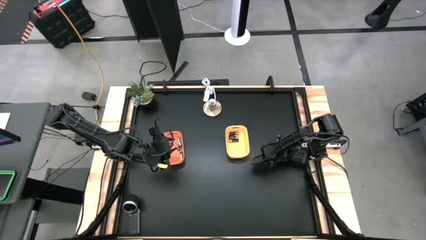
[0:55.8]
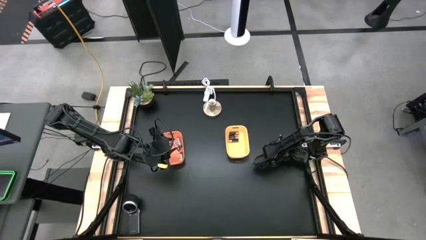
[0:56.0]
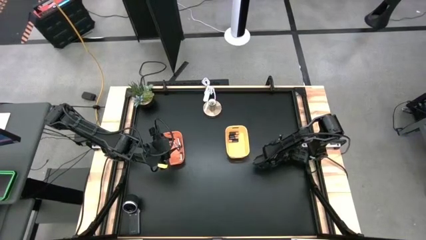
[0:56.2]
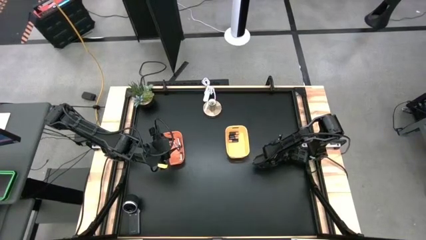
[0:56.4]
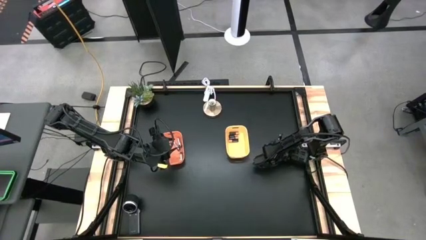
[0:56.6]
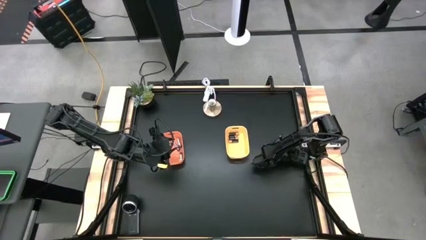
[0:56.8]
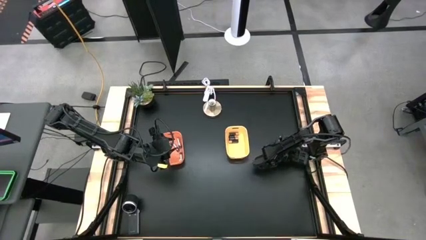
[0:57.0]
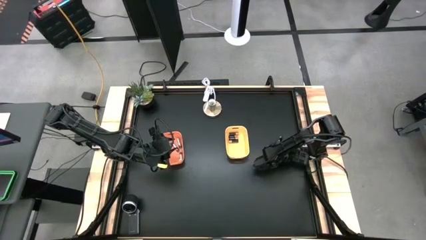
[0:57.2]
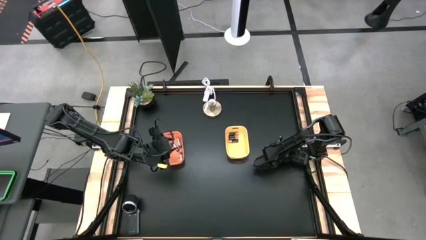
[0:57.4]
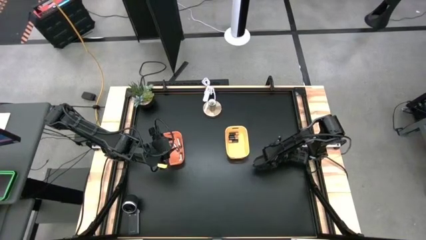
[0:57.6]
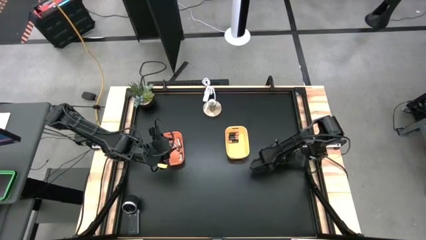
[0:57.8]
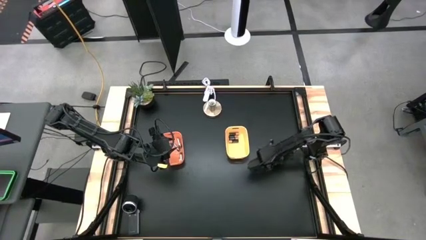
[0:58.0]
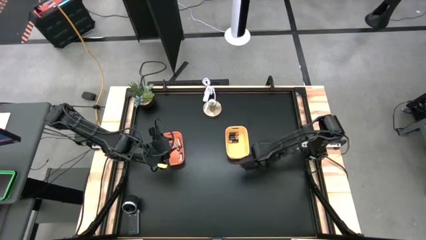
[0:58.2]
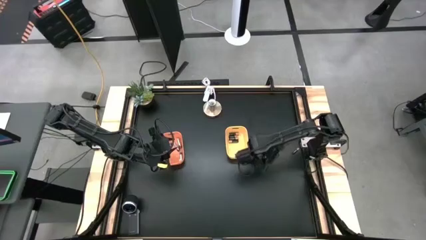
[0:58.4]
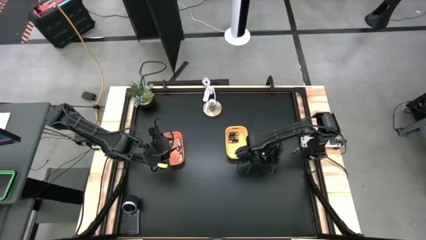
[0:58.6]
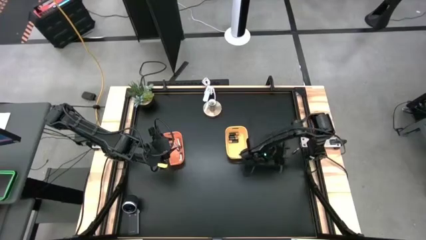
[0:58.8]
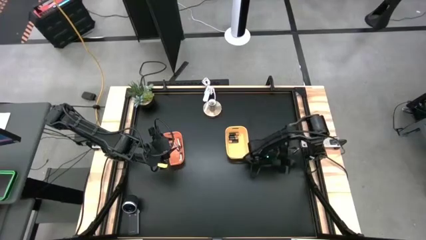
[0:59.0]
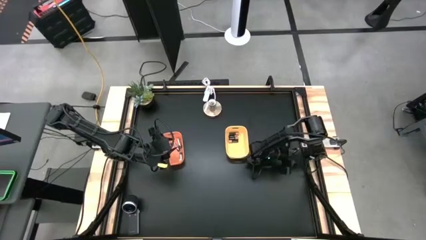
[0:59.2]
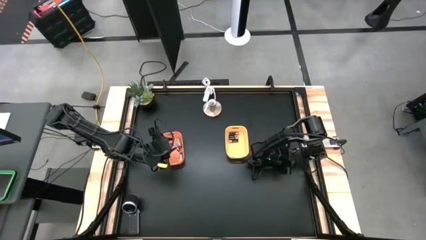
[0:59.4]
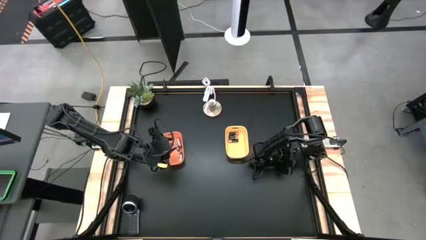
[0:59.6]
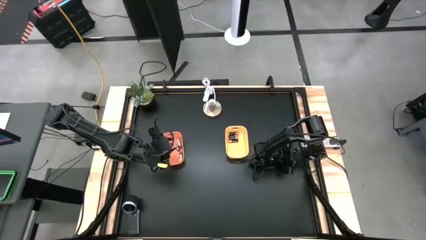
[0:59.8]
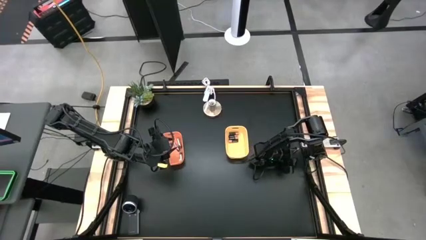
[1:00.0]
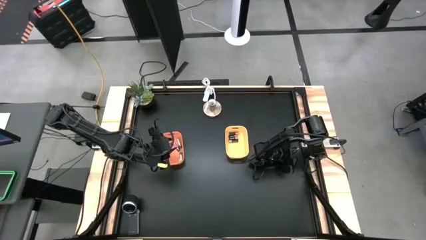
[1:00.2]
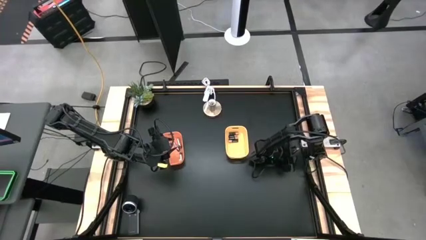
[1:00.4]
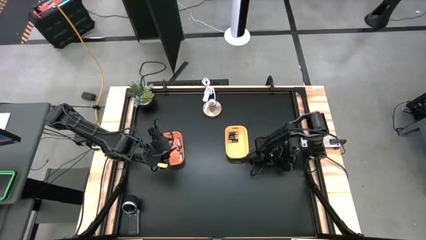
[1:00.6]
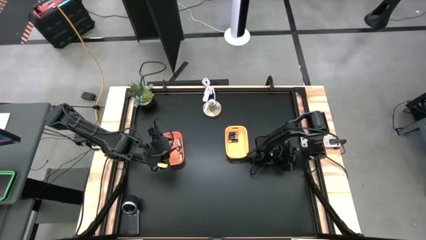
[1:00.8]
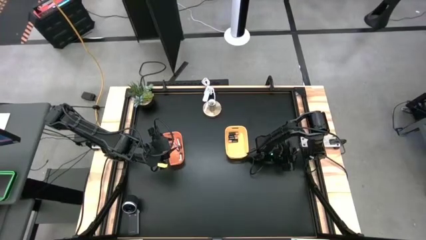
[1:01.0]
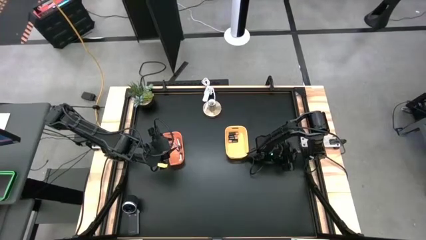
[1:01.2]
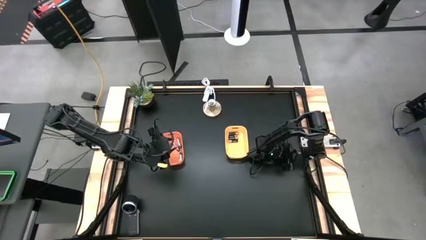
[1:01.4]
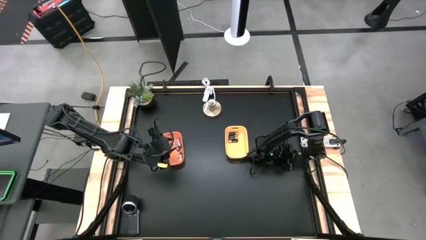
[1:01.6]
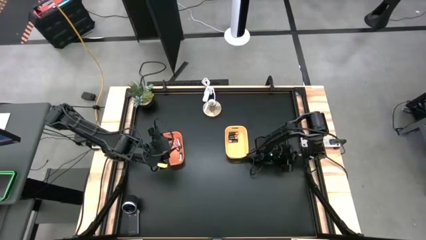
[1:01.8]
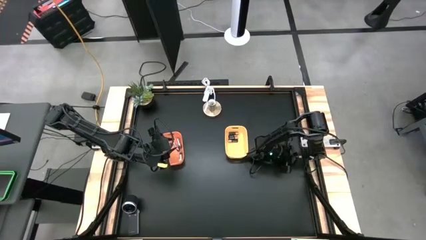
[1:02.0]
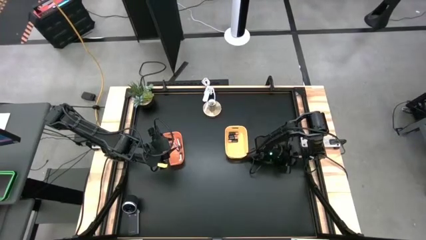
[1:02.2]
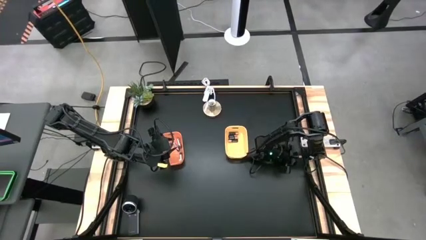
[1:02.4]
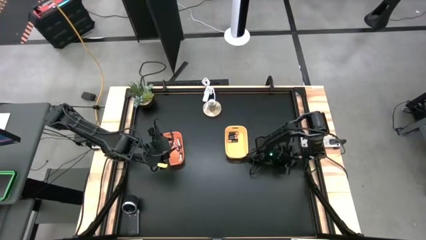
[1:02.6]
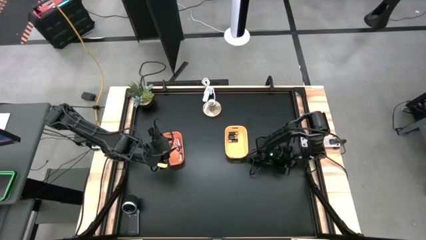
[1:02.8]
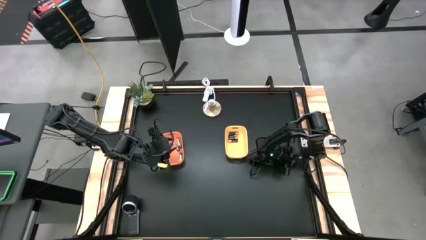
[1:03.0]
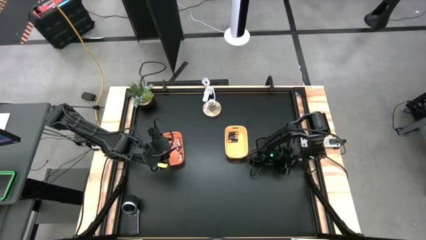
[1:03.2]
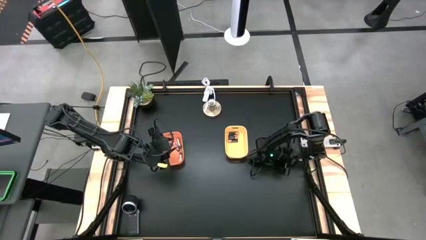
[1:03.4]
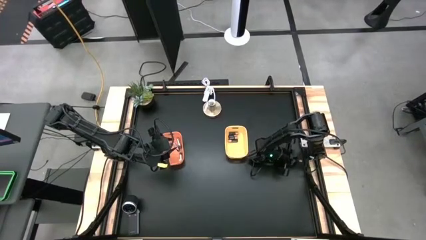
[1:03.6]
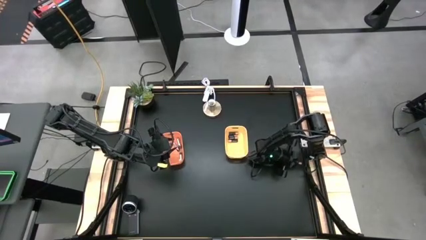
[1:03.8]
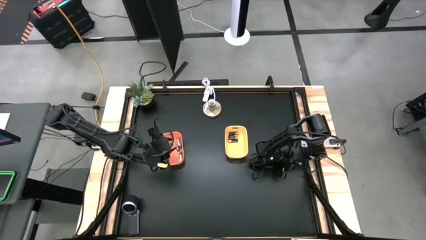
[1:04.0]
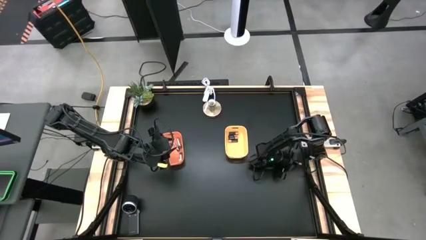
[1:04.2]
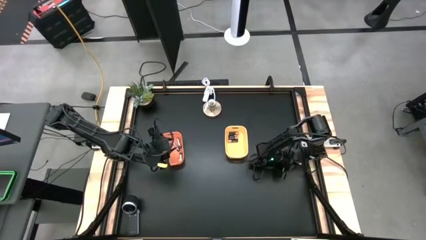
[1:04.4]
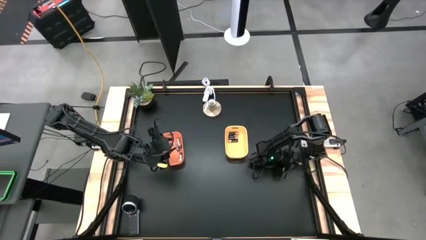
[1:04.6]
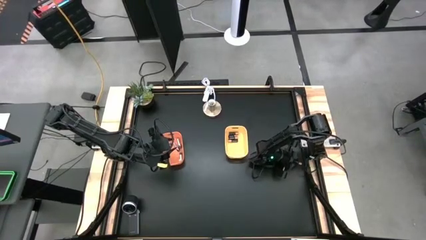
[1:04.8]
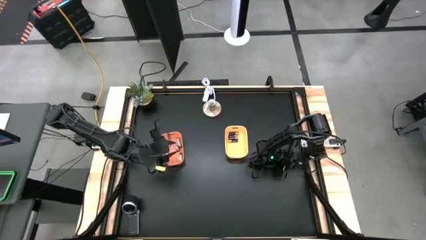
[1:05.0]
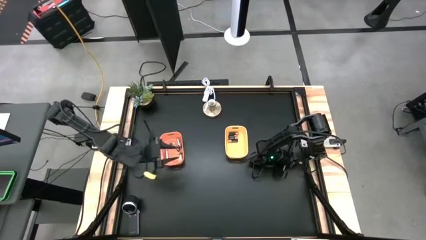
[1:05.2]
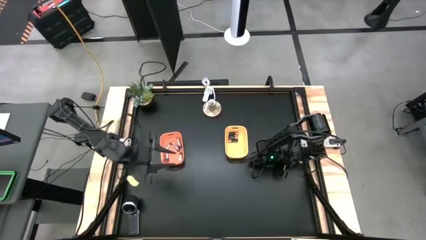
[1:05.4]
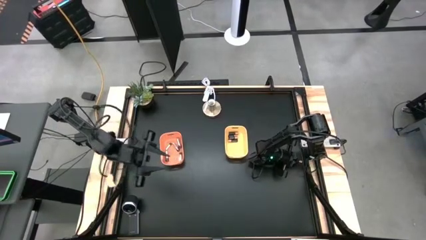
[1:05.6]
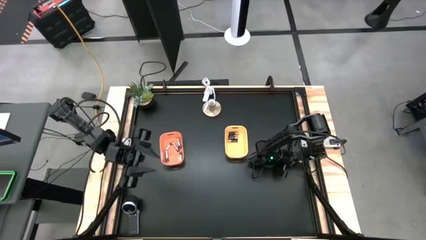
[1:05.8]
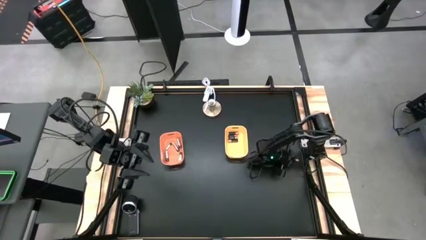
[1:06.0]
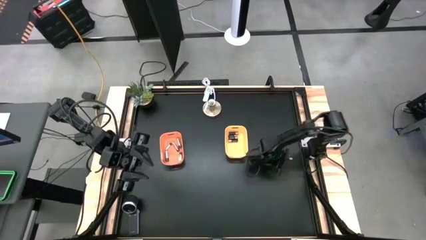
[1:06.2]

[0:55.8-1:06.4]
Task: Sort batteries
Put the black battery into the yellow bin

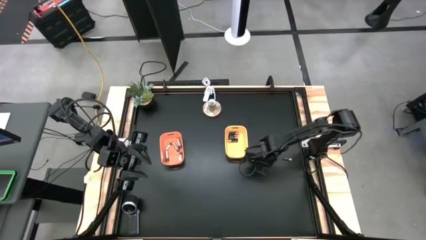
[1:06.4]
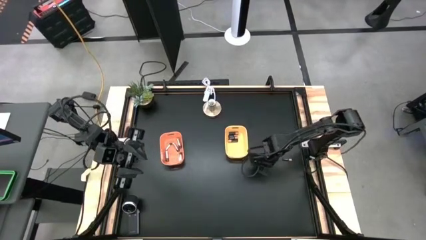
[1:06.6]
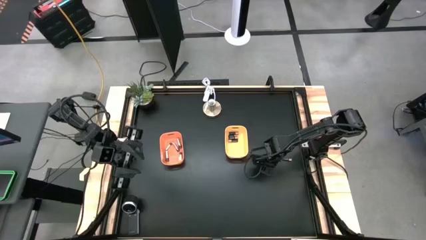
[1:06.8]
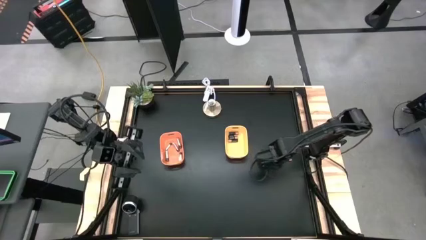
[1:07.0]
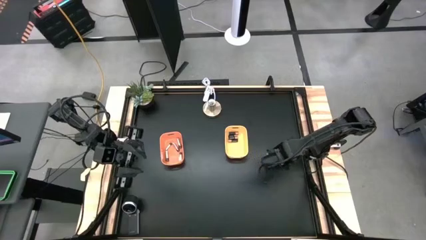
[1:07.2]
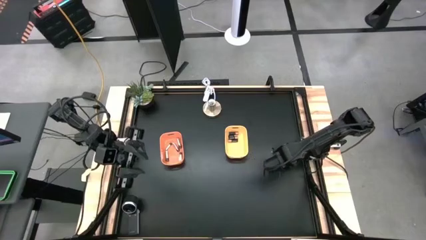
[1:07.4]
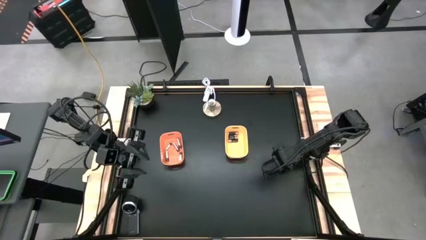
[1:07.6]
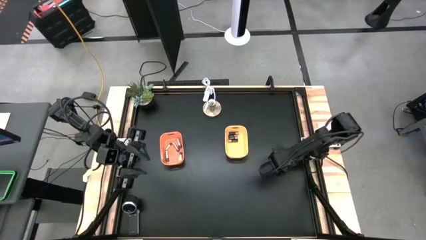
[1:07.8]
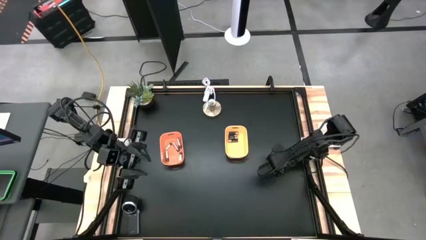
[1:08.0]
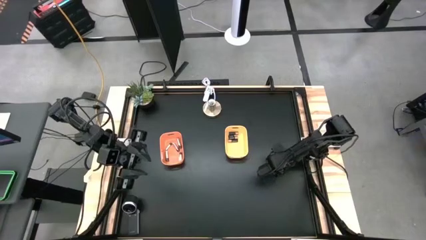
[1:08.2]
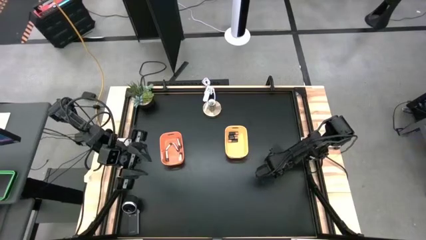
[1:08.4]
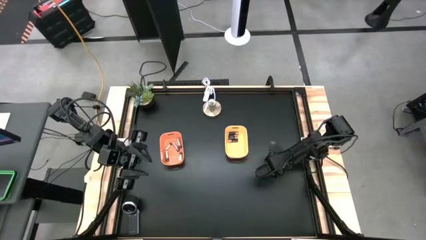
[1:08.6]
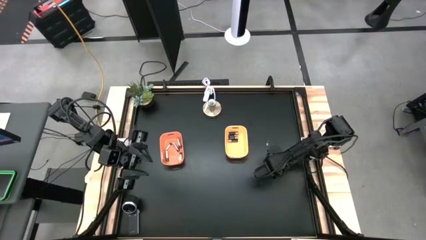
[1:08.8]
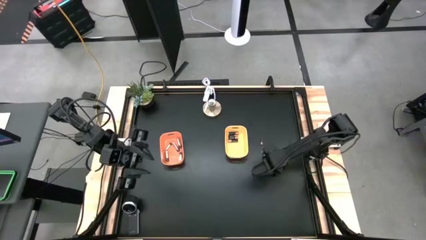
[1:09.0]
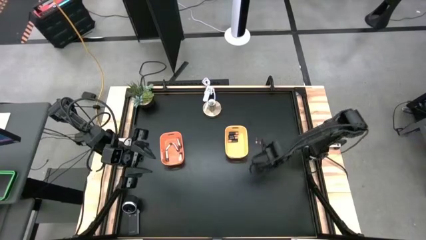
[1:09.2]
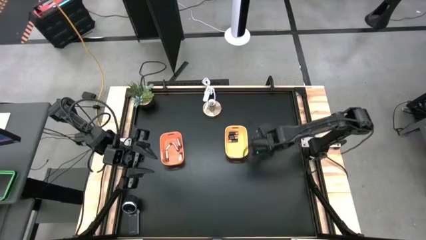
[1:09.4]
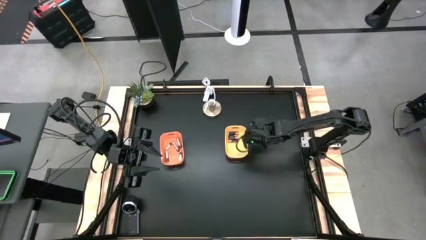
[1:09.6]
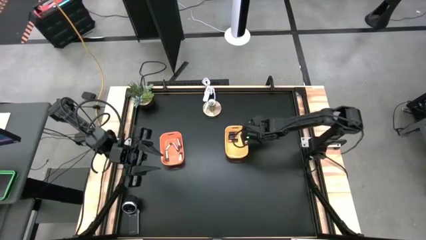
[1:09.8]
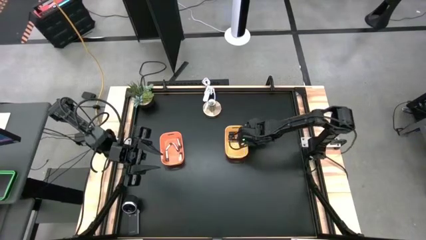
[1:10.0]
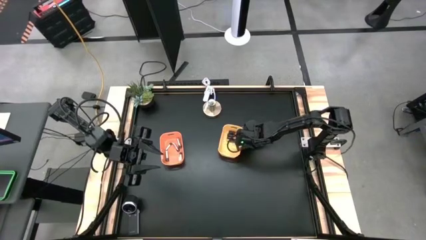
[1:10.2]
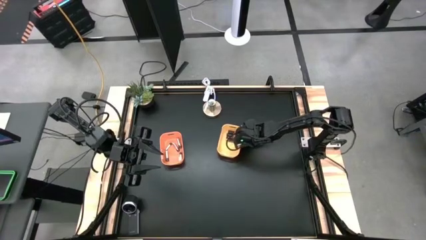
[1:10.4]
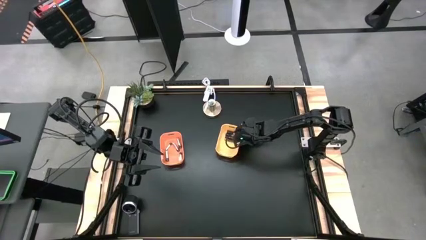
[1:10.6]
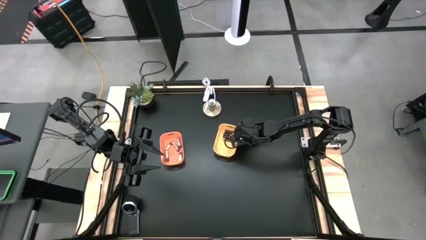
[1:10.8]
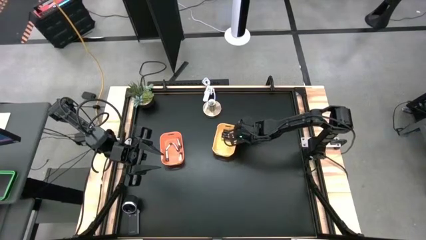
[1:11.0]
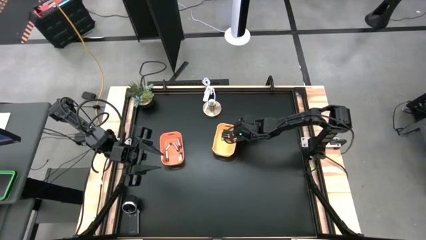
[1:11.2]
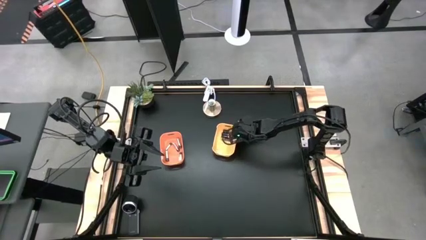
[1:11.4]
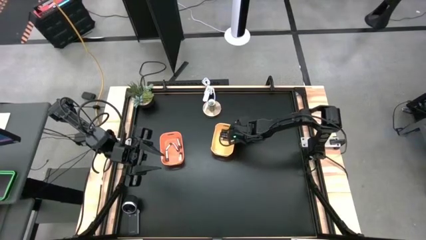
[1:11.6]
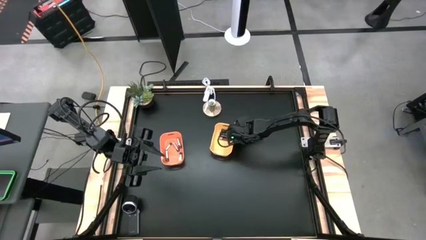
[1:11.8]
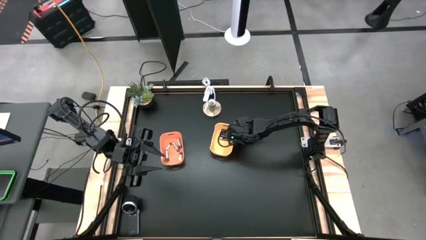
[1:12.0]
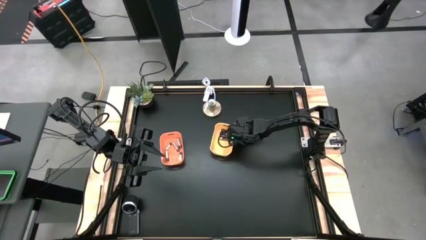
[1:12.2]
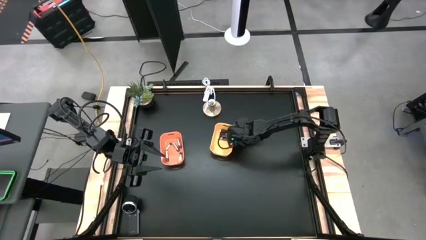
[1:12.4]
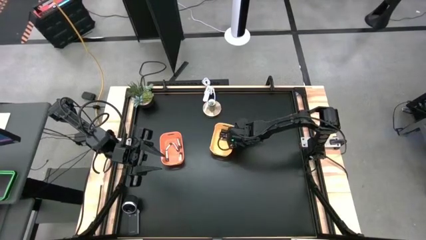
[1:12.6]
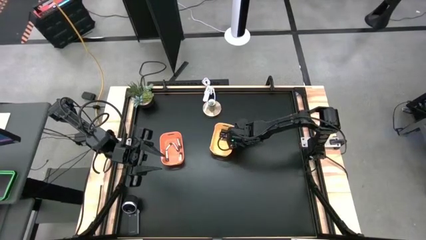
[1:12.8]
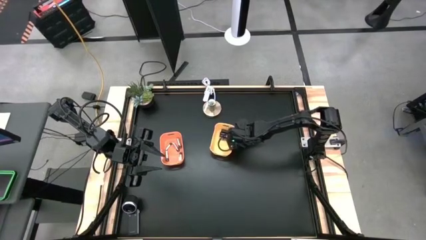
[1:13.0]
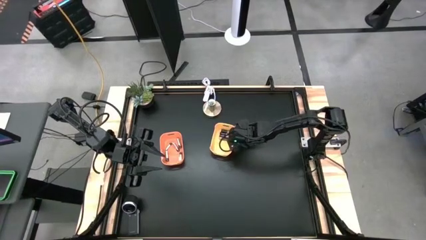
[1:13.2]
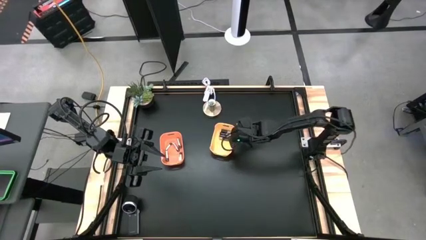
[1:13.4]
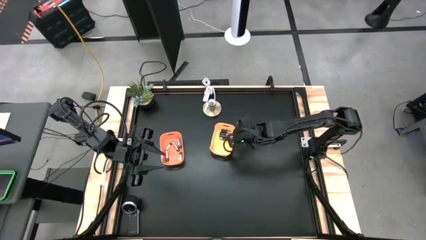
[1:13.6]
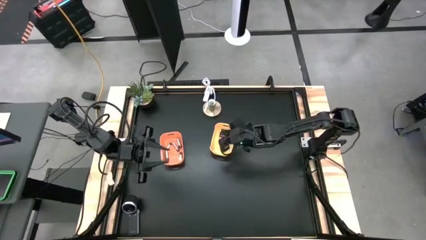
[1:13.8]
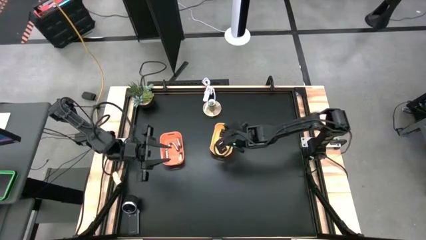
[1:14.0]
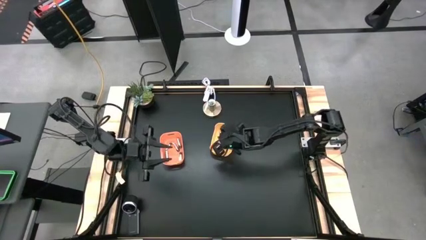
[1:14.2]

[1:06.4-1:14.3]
Put the black battery into the yellow bin
